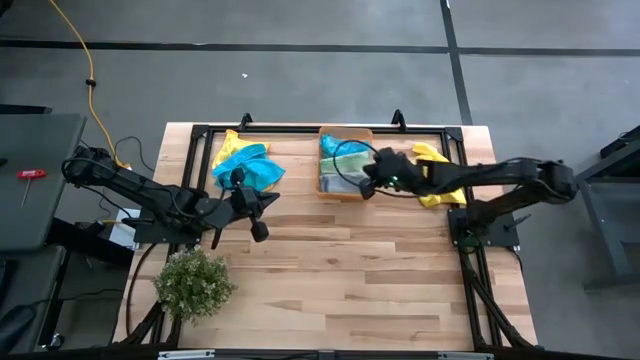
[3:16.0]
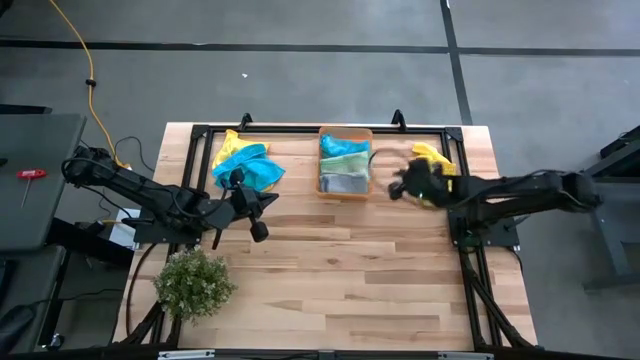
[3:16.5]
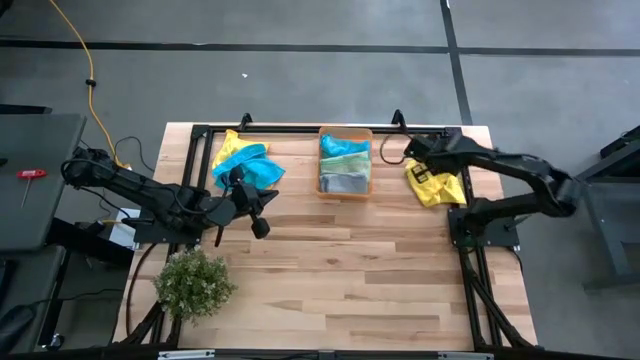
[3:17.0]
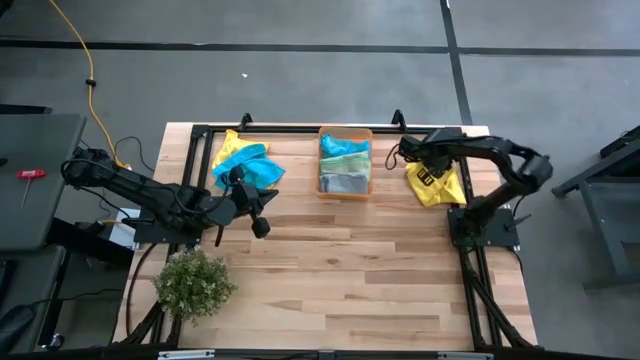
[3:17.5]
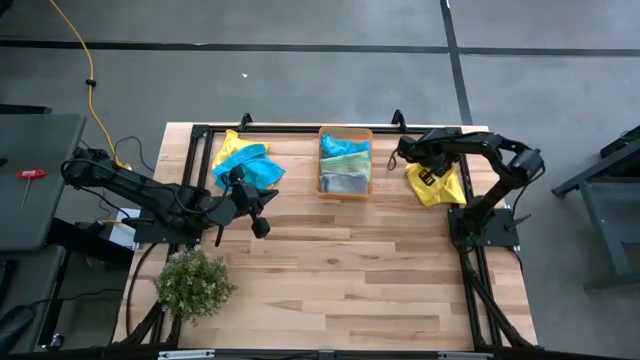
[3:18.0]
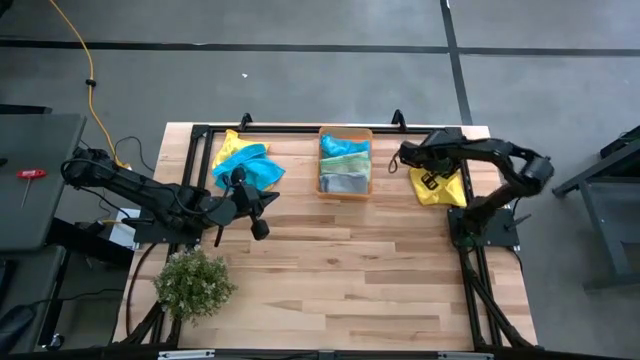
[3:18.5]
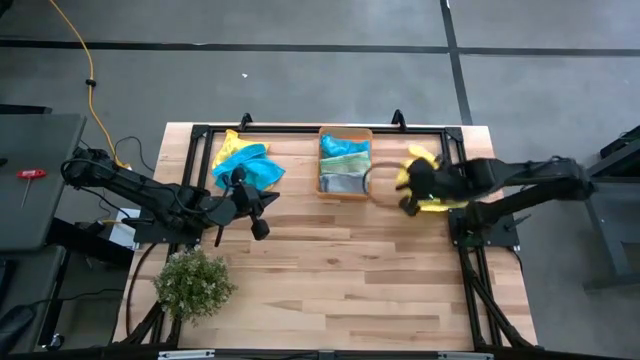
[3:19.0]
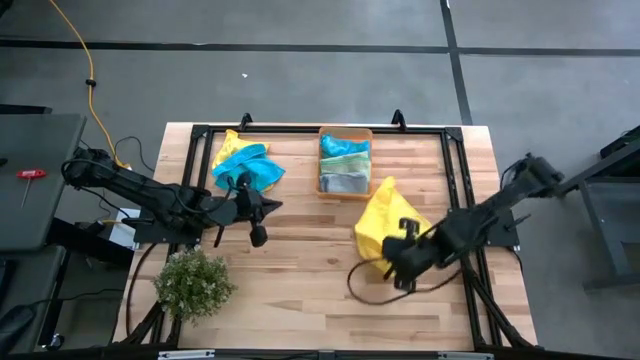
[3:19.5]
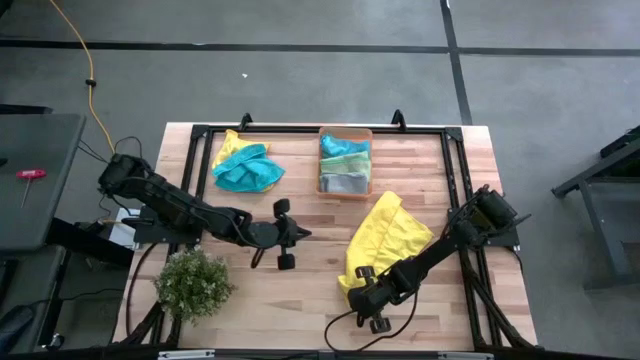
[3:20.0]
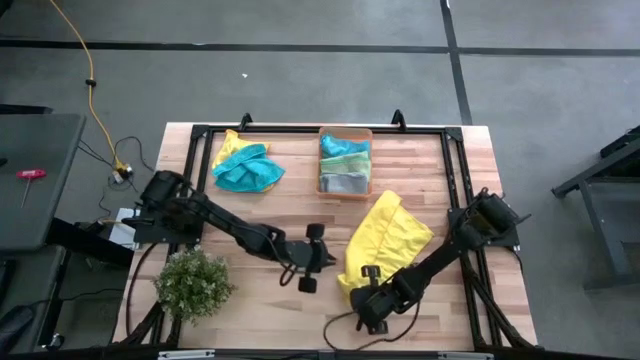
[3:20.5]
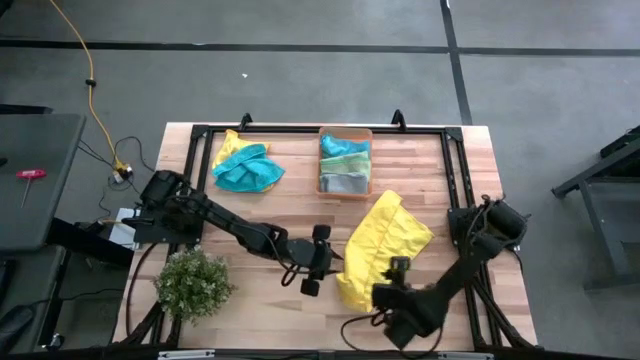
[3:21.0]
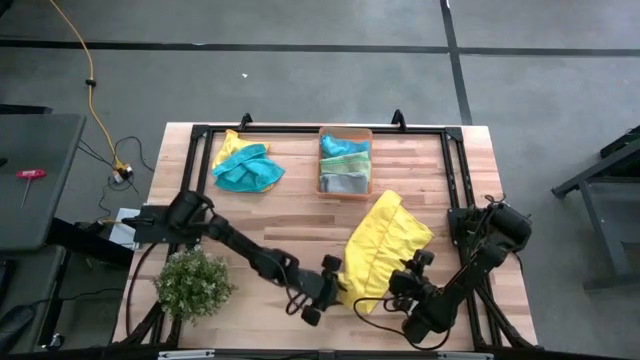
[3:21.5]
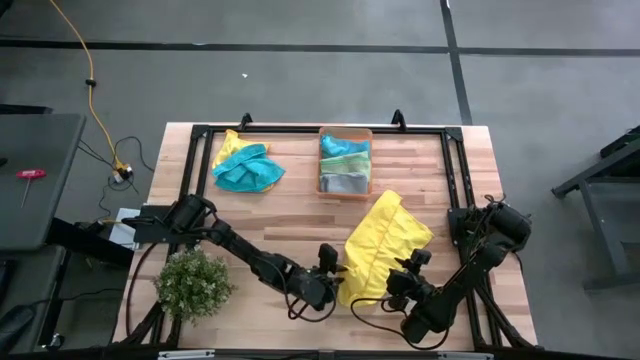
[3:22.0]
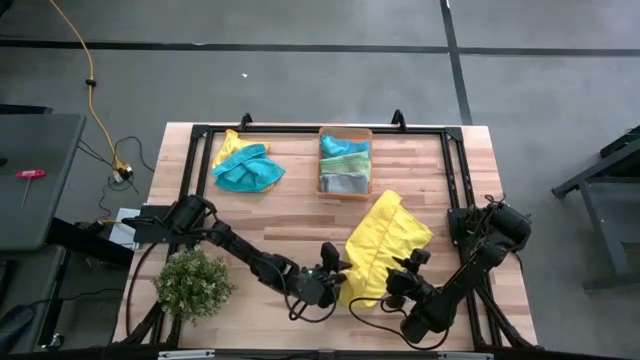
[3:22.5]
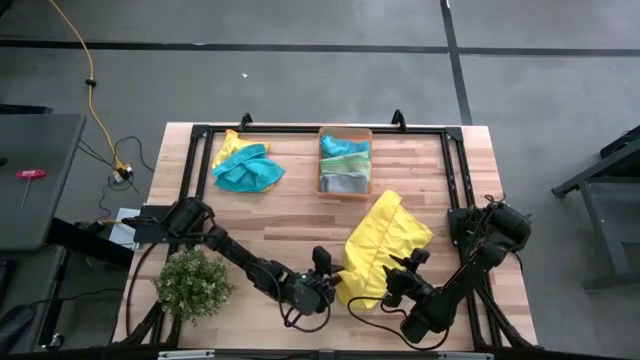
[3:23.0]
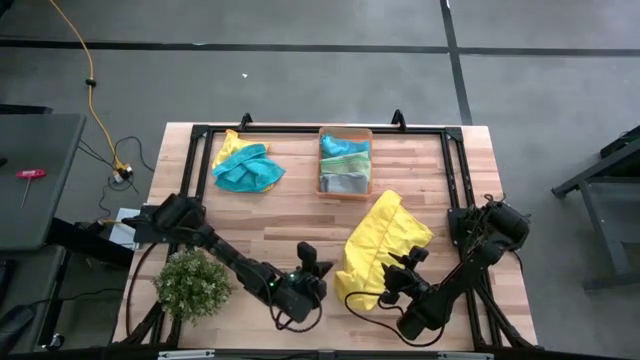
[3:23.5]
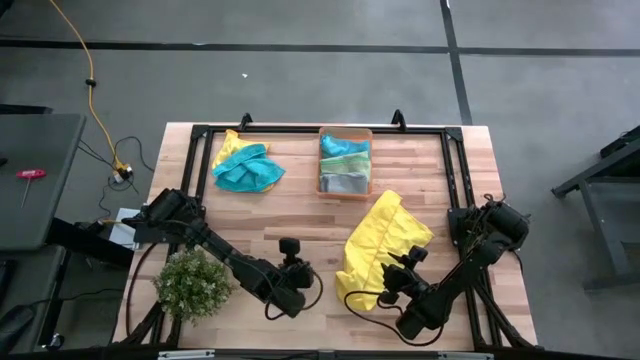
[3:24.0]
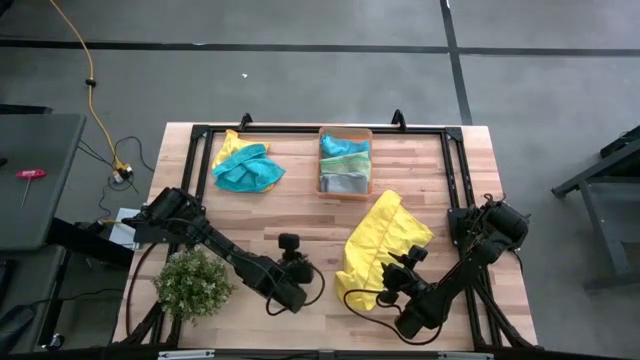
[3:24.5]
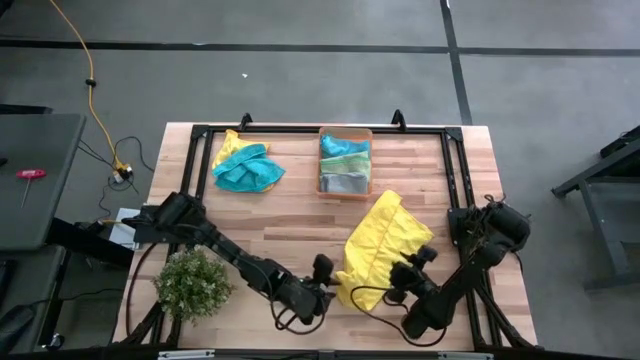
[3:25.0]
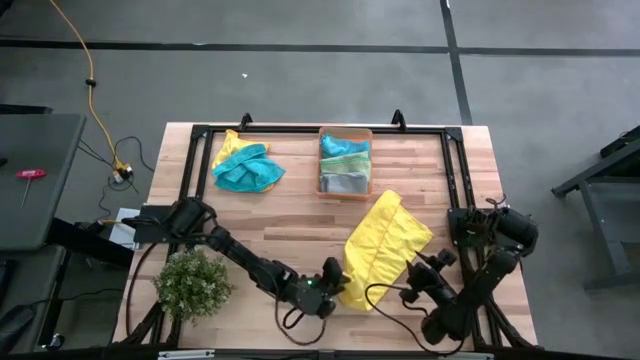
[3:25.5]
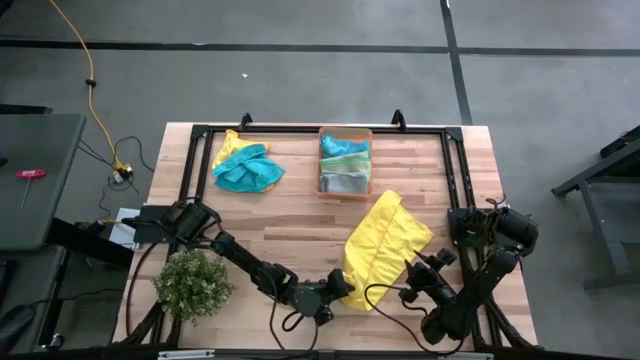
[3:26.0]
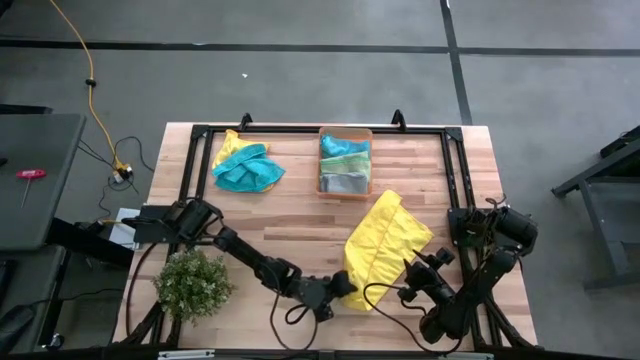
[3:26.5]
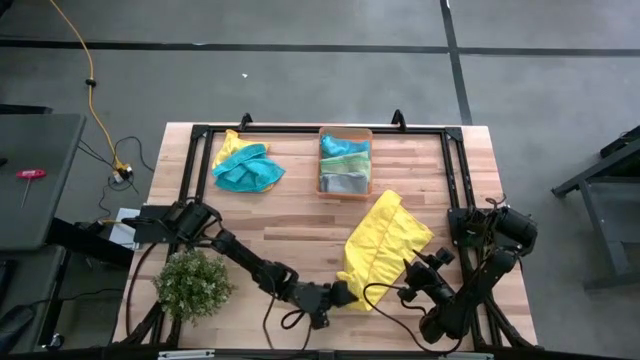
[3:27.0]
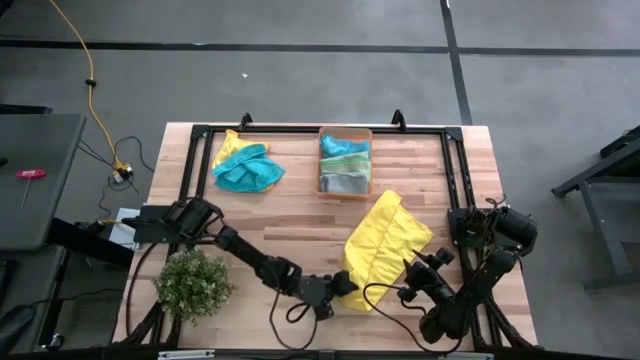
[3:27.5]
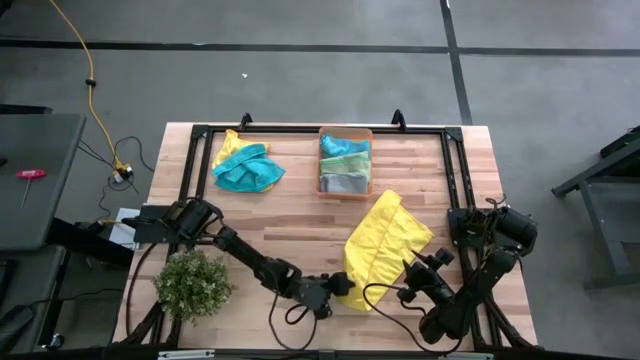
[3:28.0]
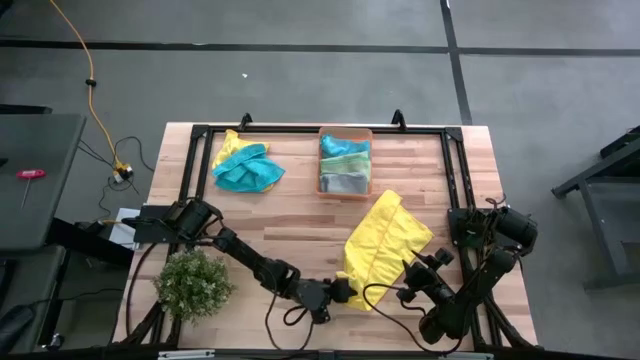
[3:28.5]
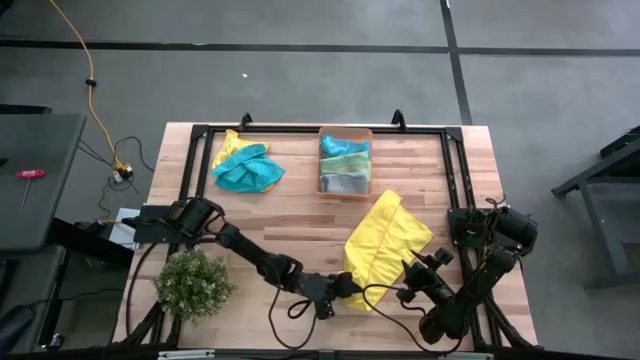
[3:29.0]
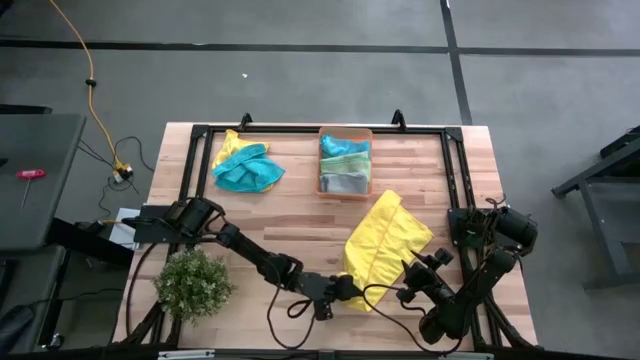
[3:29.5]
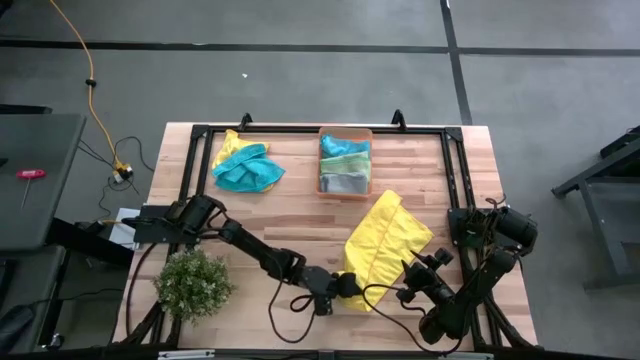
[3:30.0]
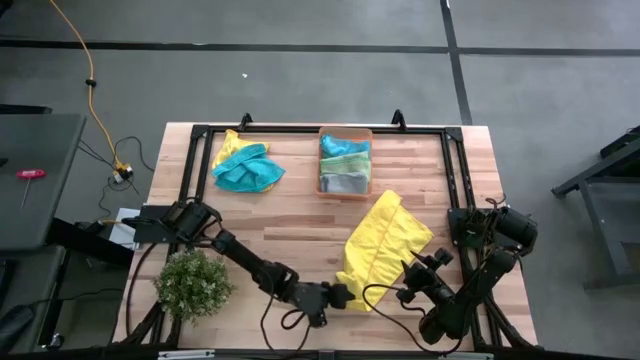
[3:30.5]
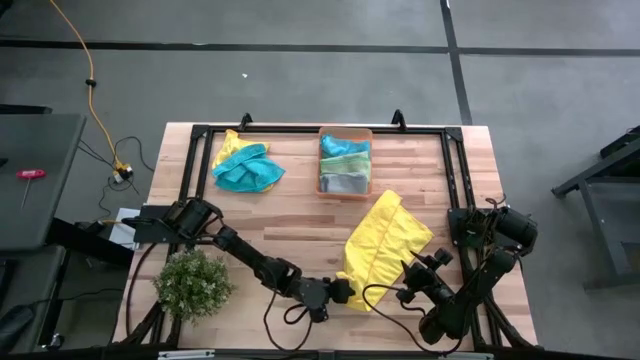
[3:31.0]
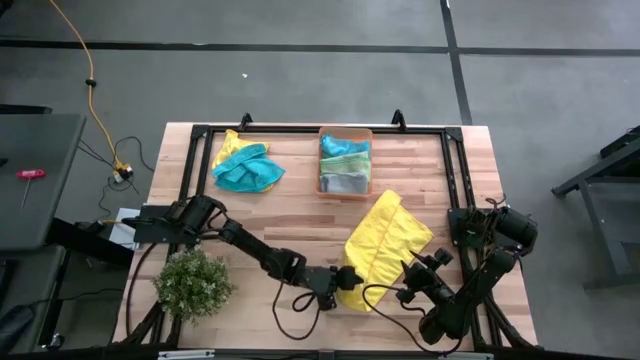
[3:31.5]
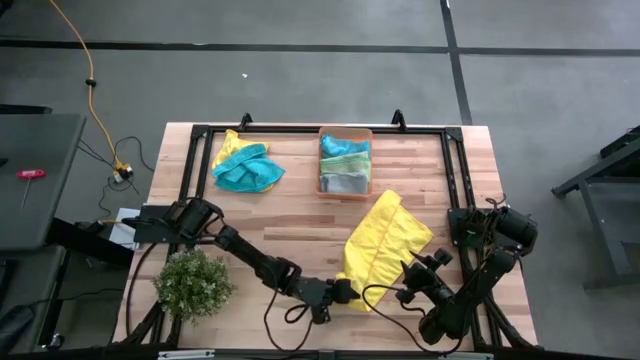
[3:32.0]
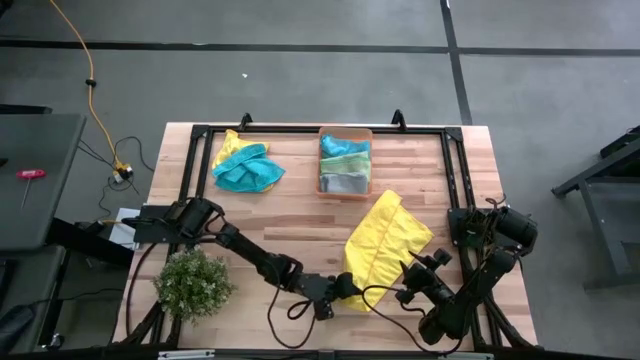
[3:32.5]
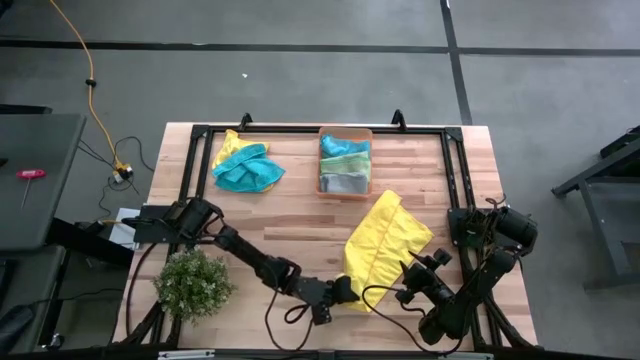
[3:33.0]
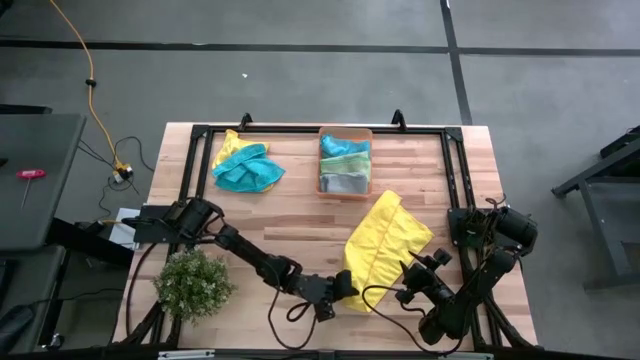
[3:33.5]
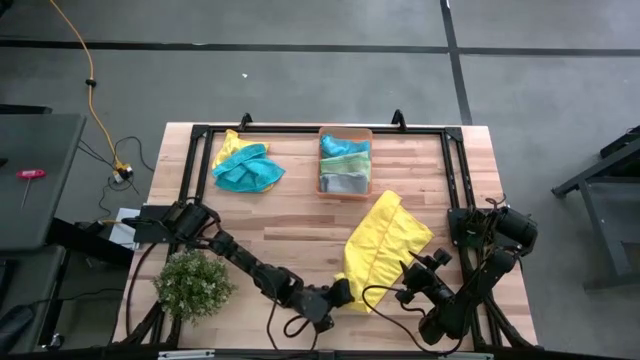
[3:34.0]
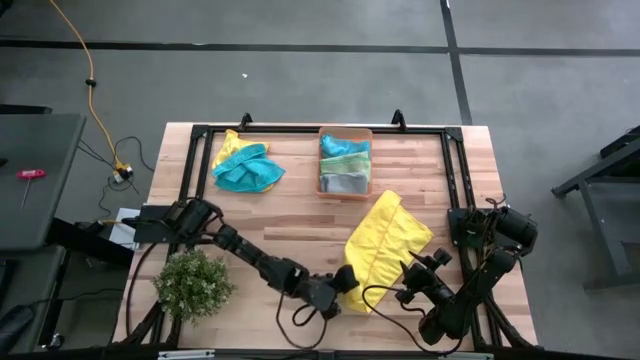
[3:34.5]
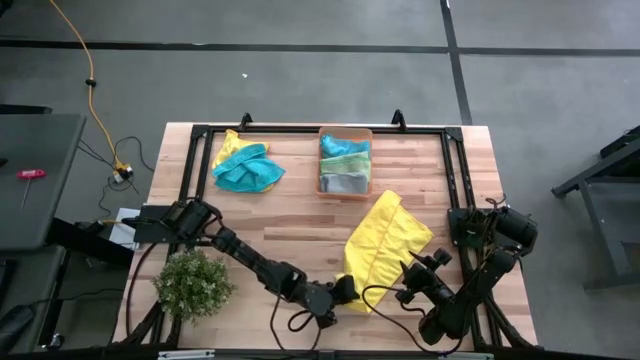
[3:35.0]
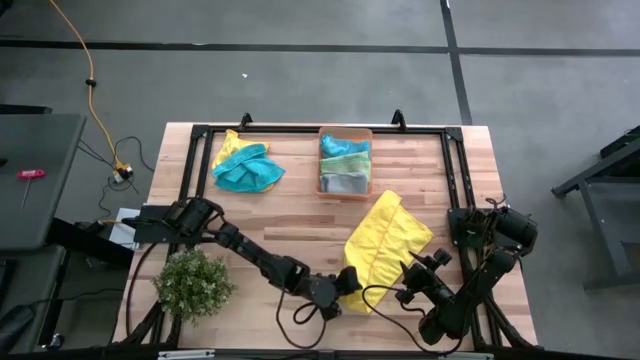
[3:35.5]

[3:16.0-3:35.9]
Task: Fold microfiber towels
Fold the right yellow microfiber cloth
